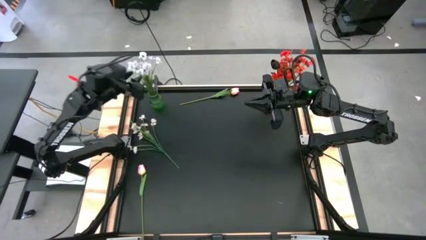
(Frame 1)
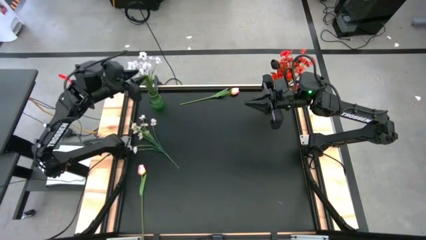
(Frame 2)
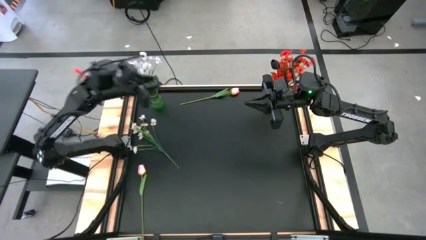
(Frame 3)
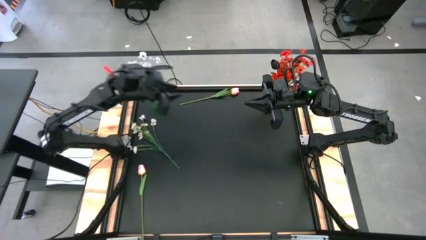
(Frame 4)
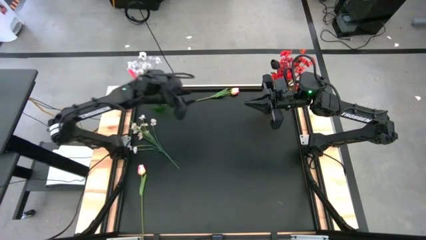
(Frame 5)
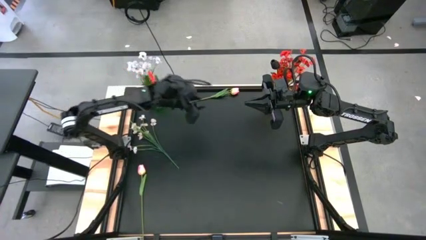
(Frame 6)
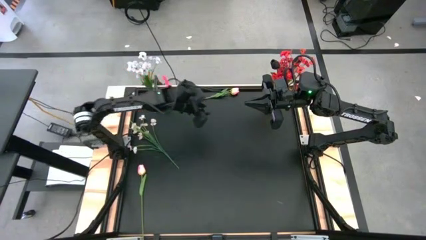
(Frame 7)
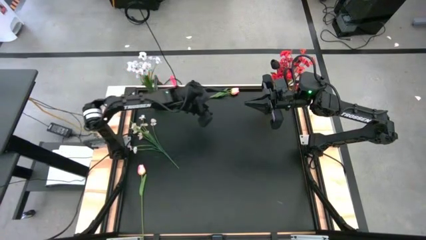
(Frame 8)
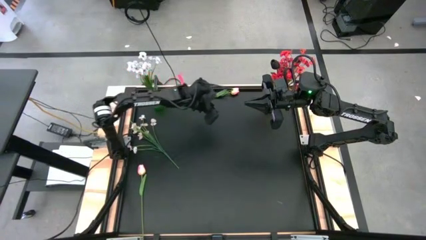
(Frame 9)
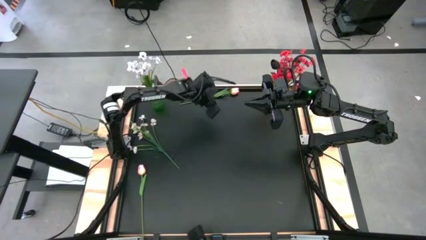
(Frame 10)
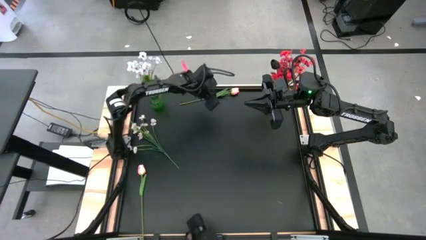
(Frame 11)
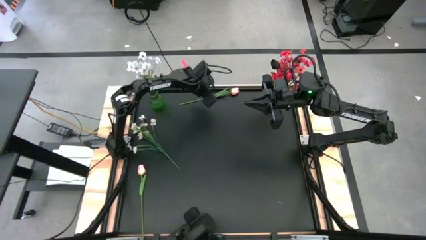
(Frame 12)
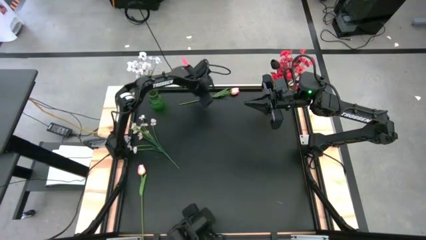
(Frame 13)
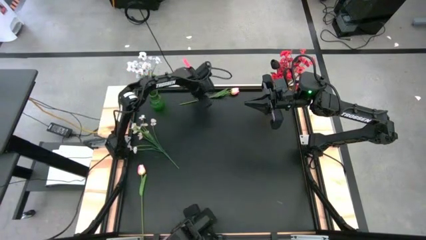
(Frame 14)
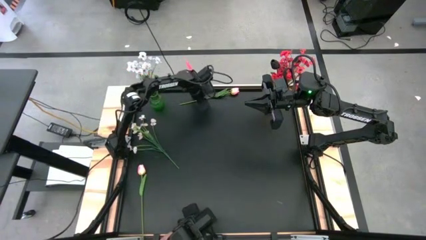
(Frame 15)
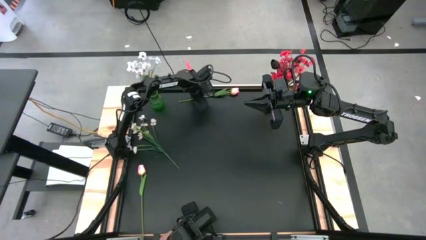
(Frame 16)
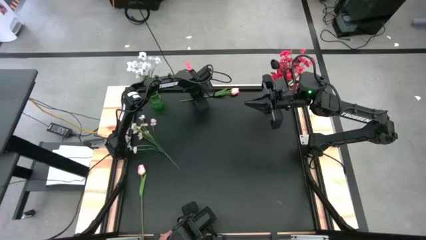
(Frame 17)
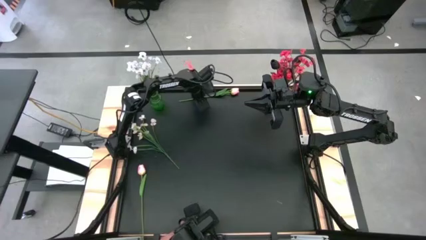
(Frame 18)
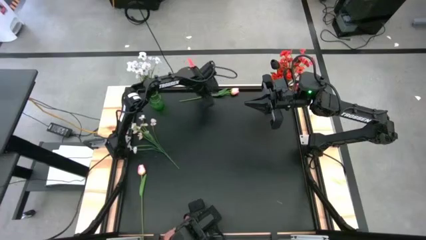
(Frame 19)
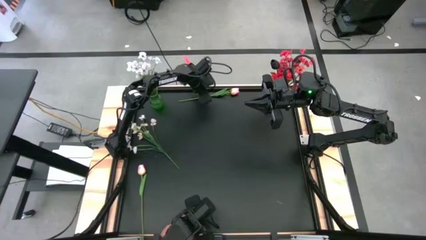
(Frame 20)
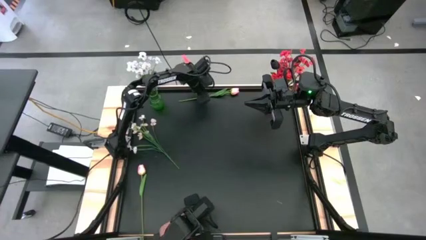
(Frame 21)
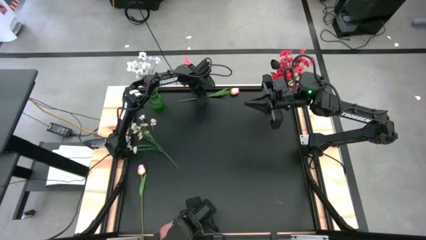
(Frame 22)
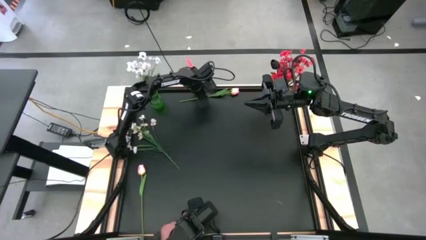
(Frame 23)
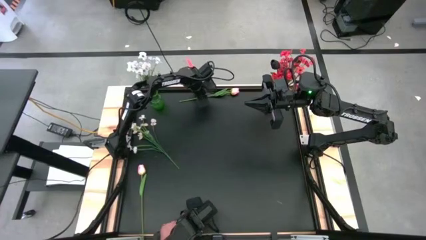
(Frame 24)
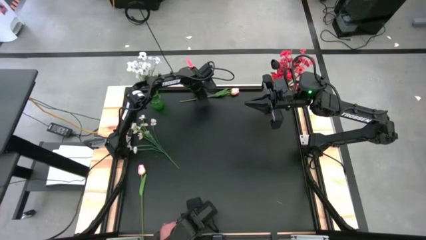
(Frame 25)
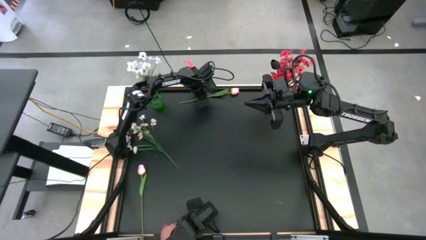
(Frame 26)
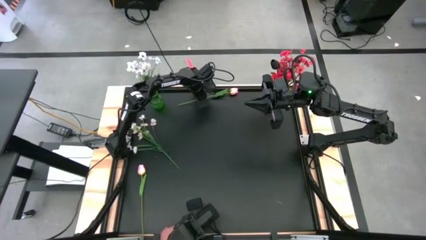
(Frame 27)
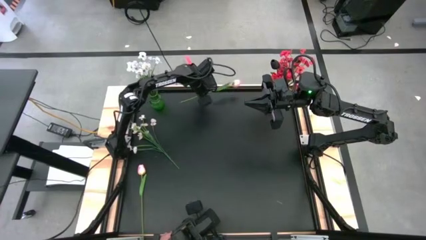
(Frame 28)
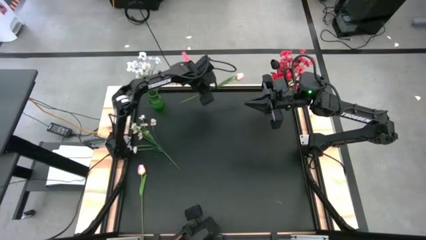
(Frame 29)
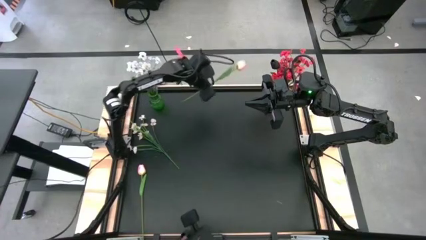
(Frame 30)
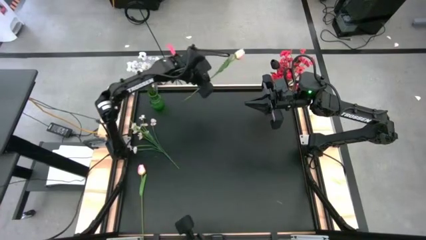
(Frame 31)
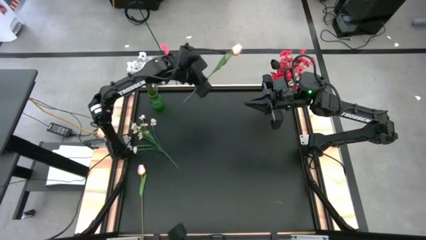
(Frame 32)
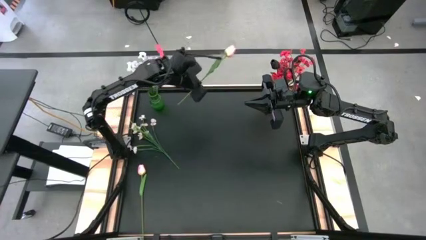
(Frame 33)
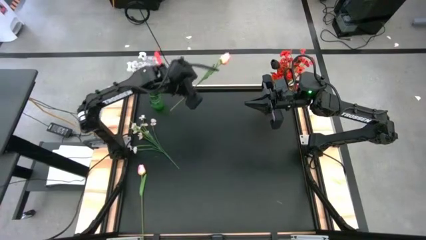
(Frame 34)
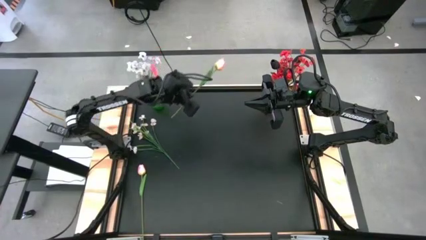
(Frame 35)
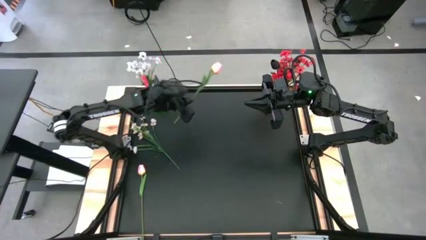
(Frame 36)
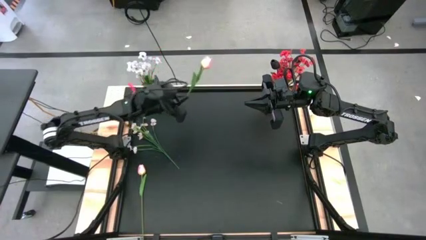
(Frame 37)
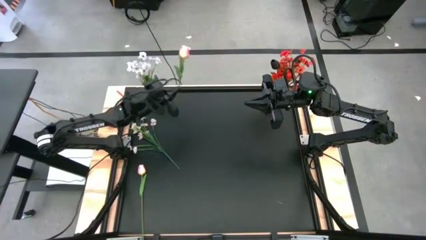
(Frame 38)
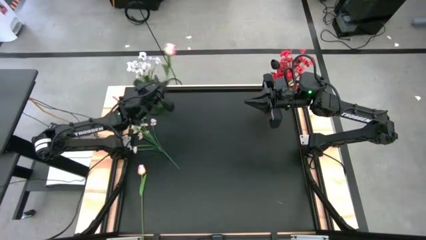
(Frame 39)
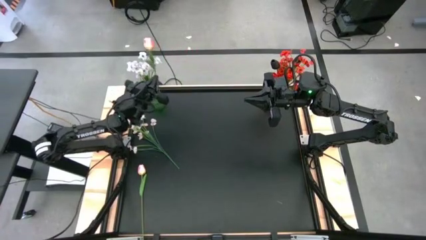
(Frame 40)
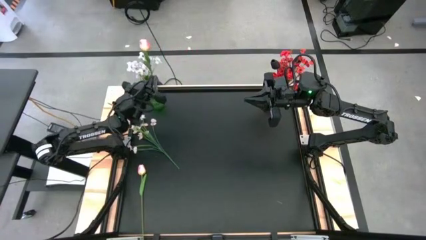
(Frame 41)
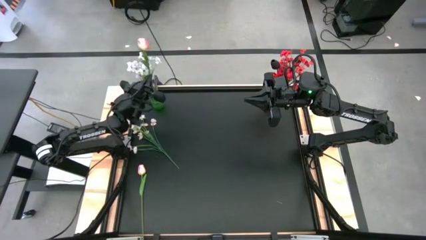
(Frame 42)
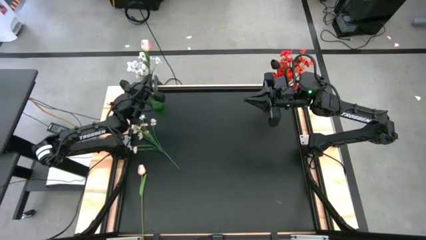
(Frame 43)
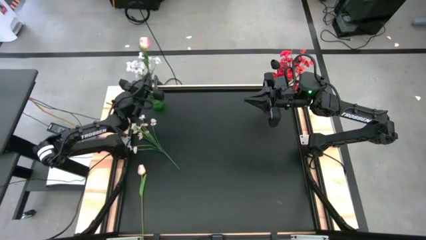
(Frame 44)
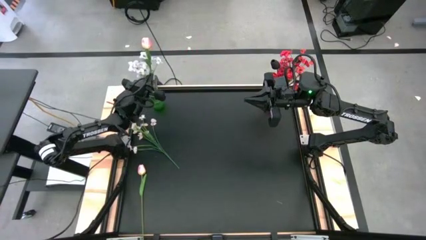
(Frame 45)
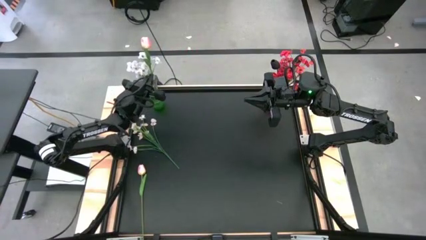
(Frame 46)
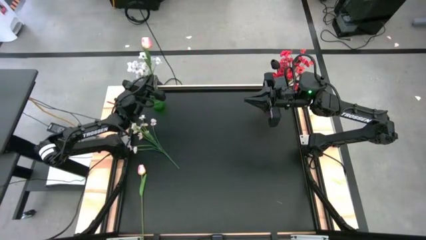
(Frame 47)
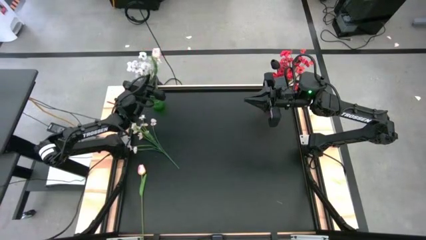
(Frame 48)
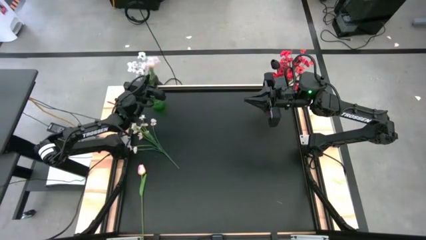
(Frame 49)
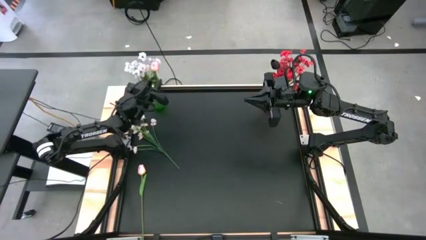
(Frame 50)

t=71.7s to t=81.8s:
Task: Sort flowers into vase by color
Put the top pink flower into the green flower vase

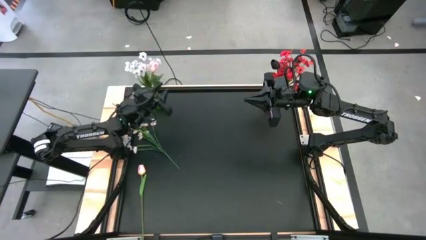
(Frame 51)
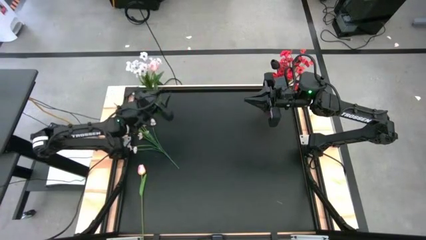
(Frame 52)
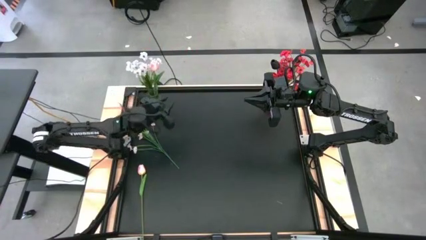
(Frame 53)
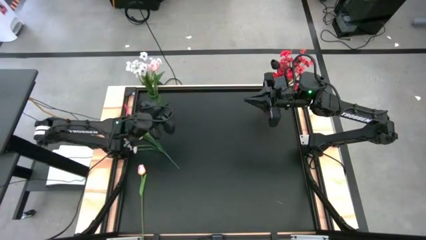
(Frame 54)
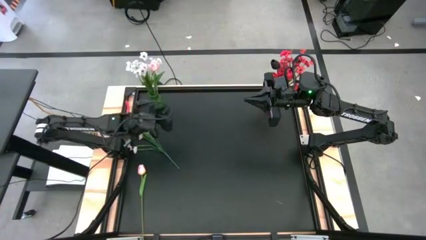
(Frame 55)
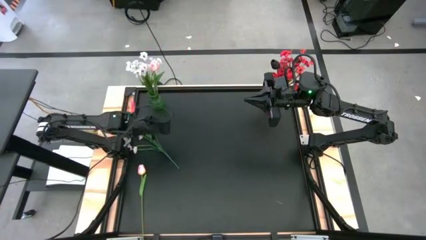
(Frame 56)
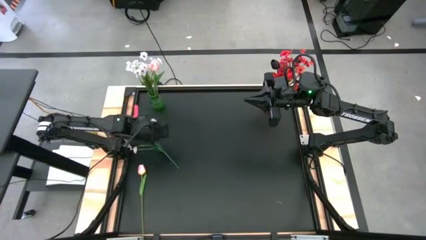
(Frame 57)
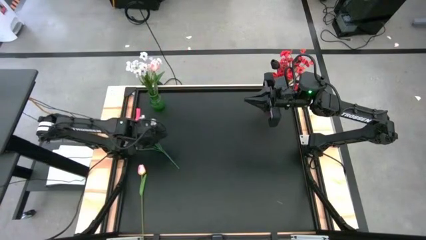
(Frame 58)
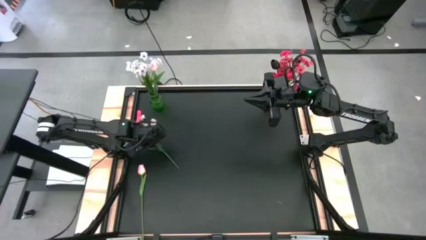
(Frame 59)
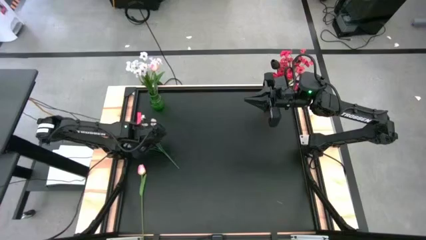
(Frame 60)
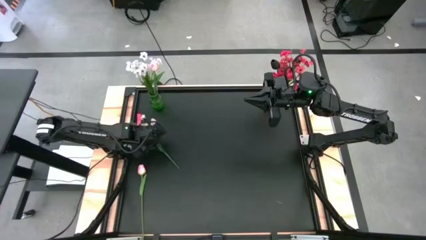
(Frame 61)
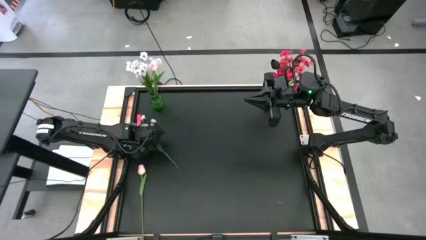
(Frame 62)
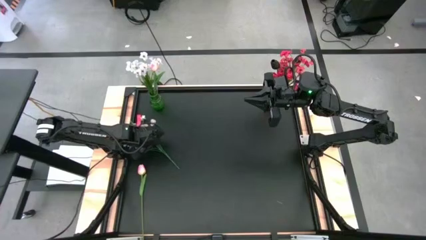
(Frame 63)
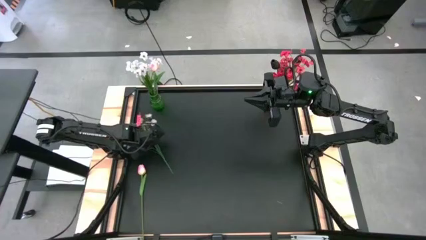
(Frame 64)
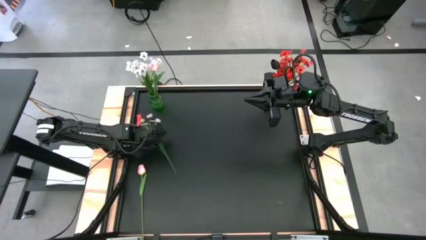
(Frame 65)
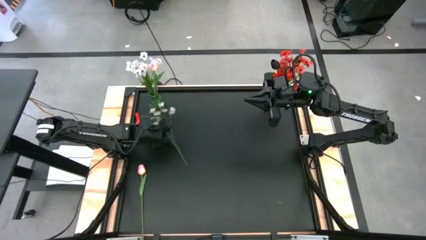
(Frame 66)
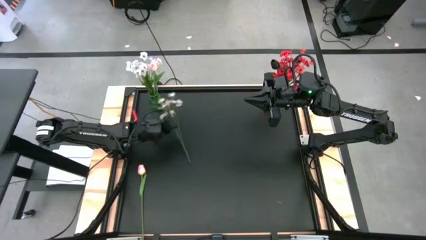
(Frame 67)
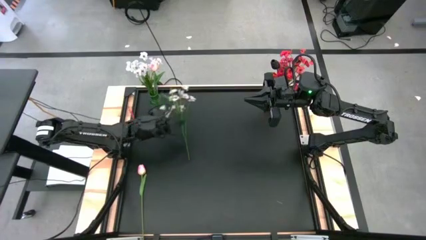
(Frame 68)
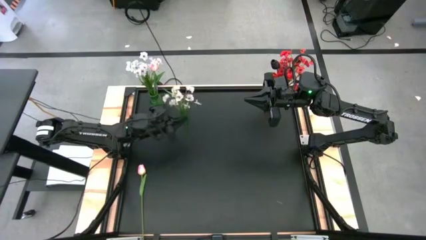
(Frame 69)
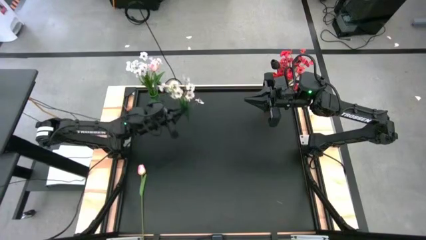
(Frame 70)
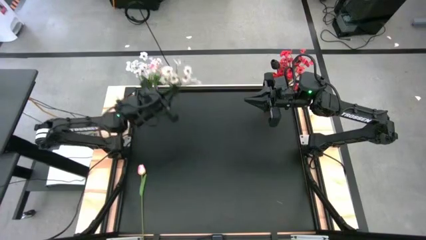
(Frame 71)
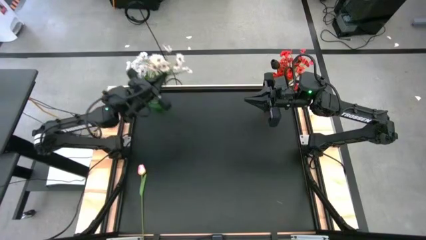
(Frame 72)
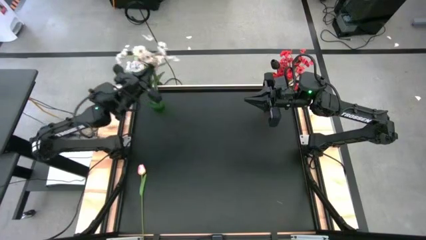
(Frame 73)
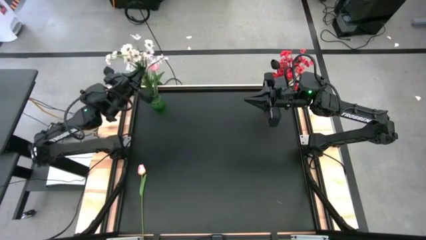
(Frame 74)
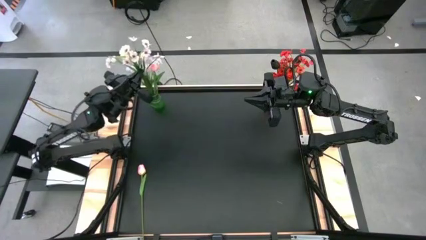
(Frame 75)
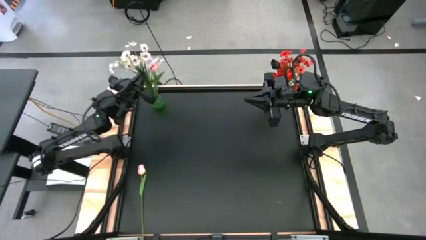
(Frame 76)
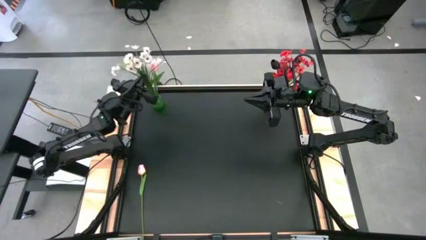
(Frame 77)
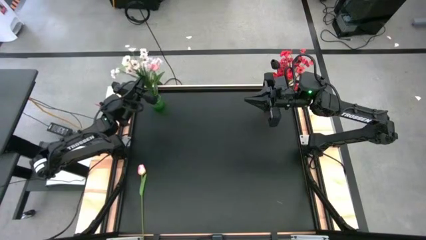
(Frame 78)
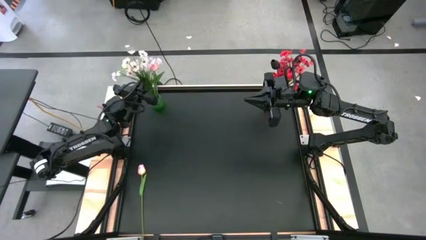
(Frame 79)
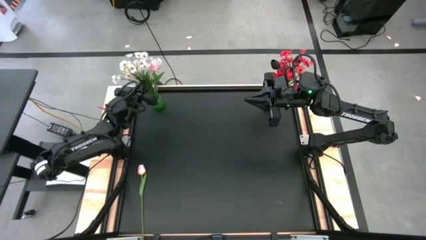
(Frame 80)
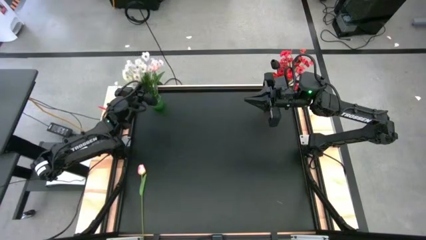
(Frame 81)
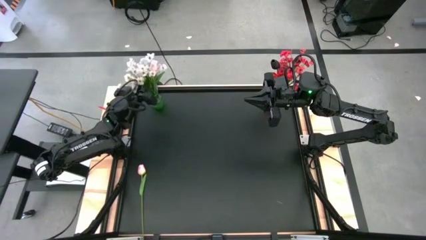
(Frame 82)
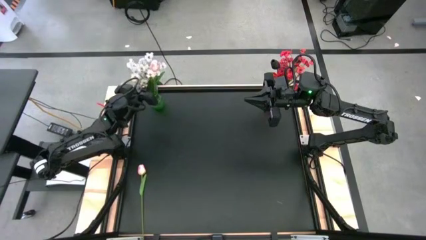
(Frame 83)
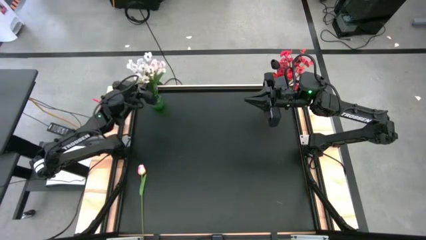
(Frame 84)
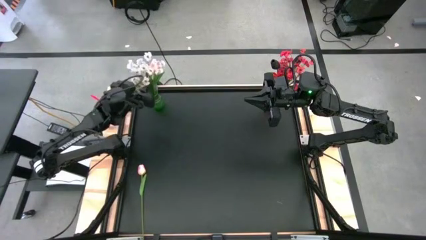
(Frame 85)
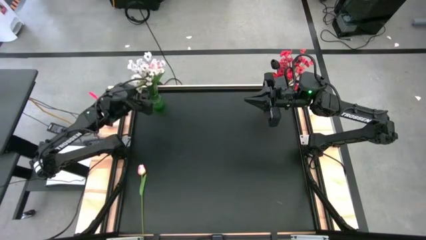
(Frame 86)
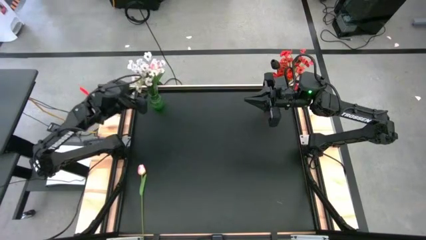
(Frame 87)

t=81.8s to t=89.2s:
Put the white flower into the green flower vase
